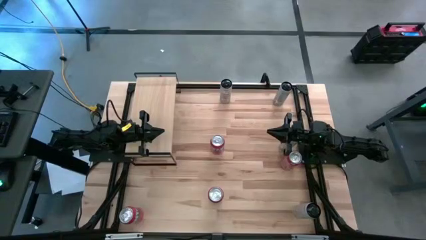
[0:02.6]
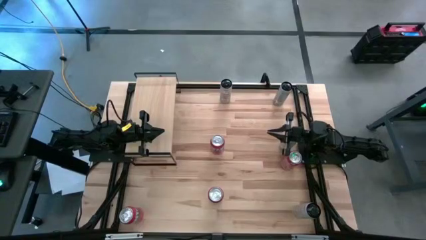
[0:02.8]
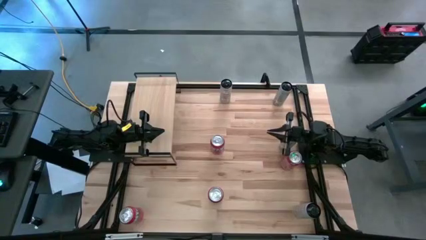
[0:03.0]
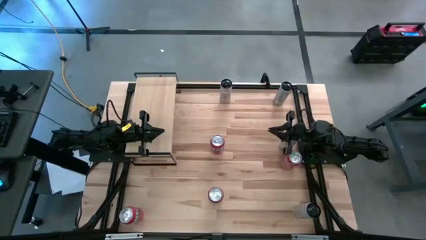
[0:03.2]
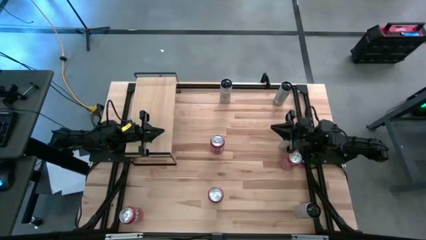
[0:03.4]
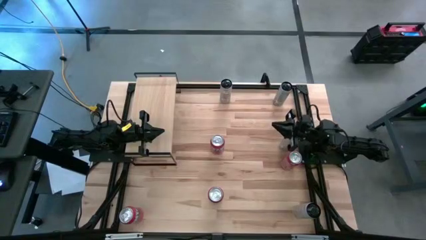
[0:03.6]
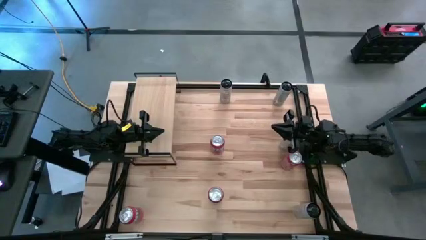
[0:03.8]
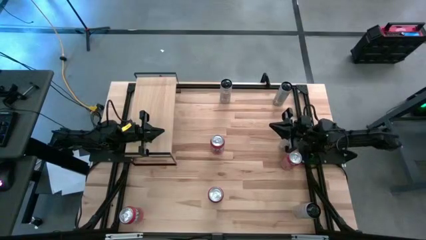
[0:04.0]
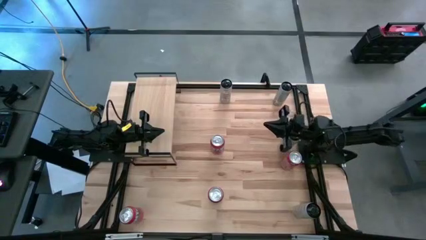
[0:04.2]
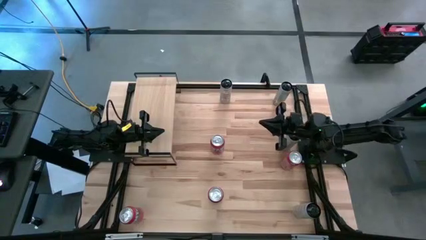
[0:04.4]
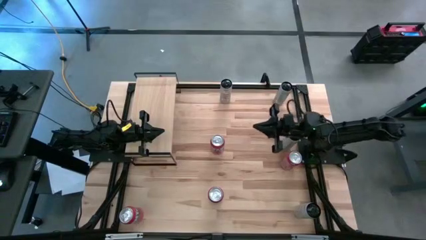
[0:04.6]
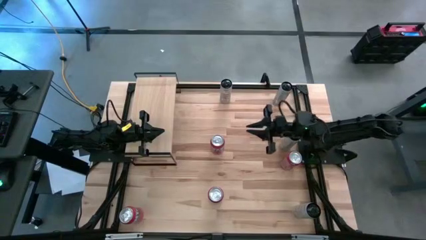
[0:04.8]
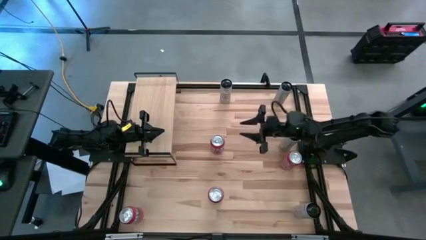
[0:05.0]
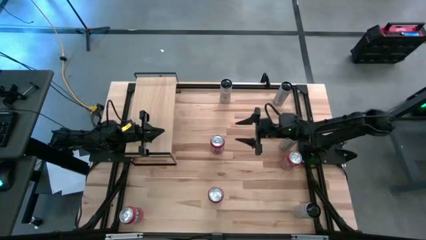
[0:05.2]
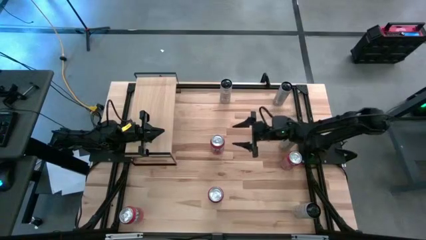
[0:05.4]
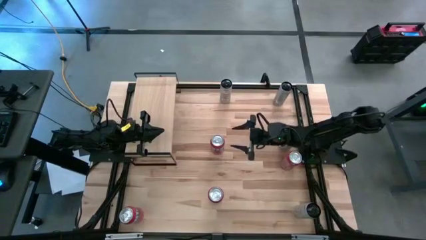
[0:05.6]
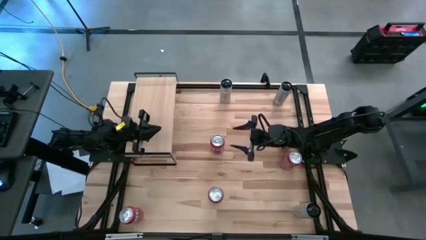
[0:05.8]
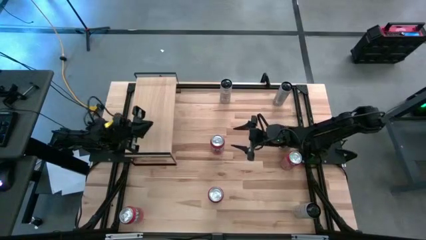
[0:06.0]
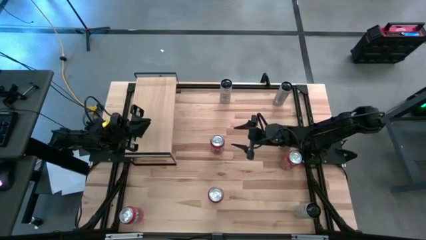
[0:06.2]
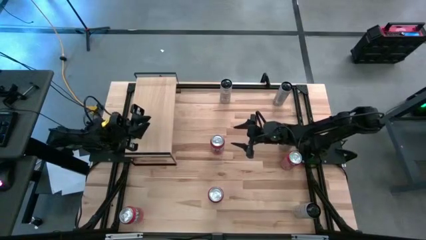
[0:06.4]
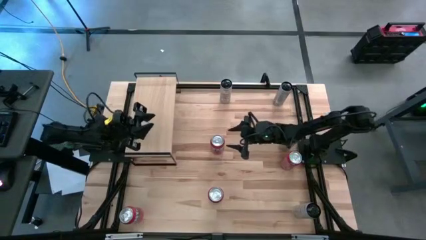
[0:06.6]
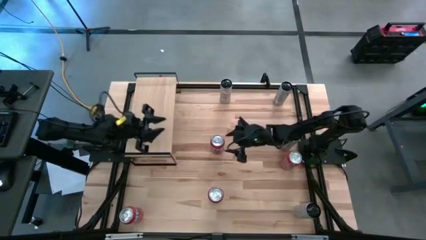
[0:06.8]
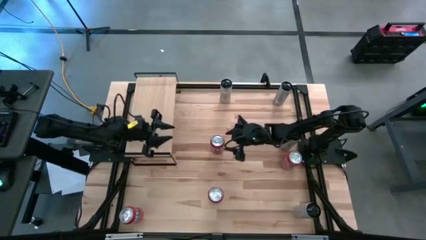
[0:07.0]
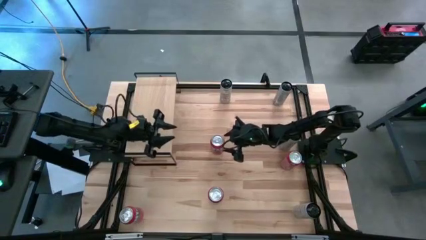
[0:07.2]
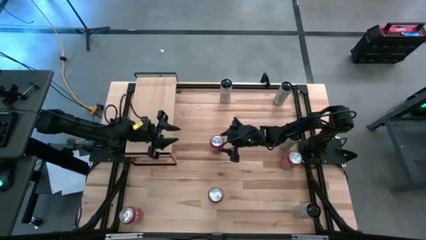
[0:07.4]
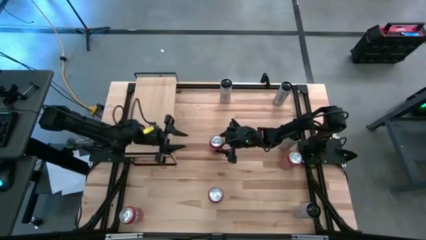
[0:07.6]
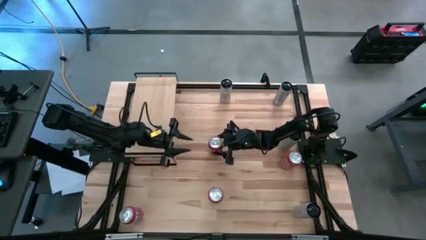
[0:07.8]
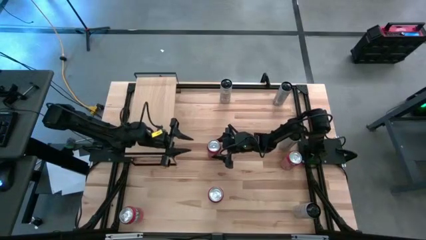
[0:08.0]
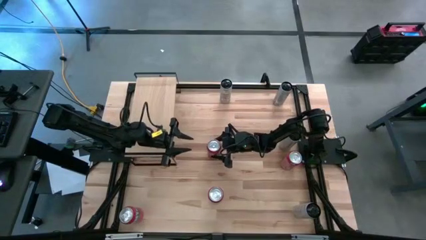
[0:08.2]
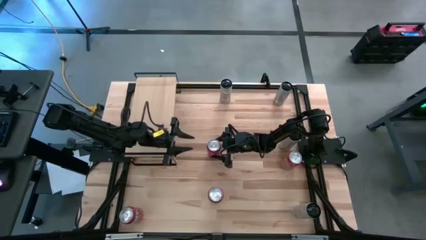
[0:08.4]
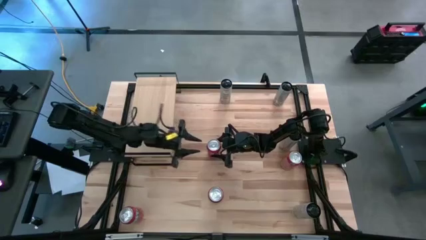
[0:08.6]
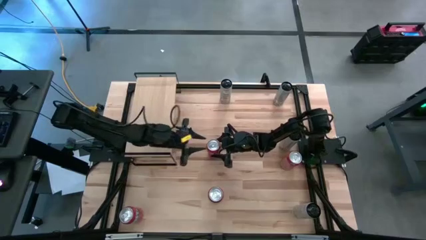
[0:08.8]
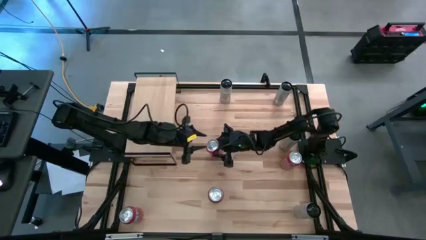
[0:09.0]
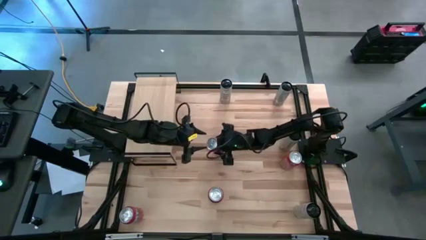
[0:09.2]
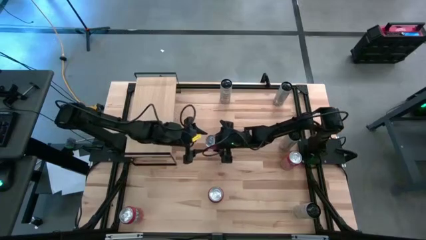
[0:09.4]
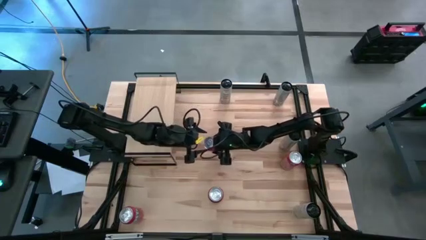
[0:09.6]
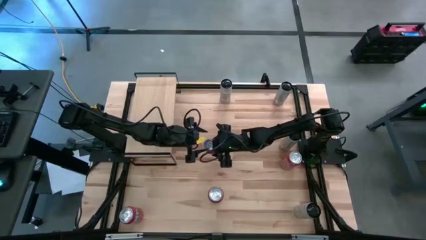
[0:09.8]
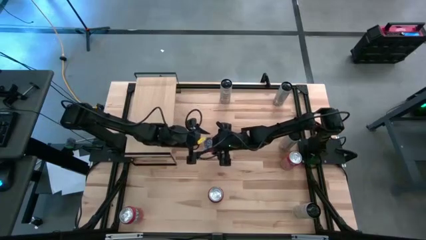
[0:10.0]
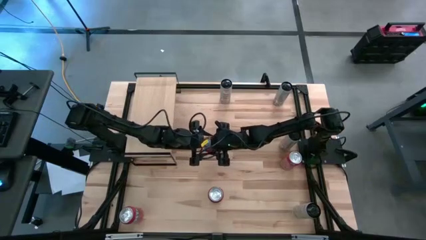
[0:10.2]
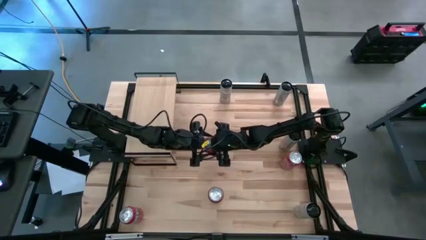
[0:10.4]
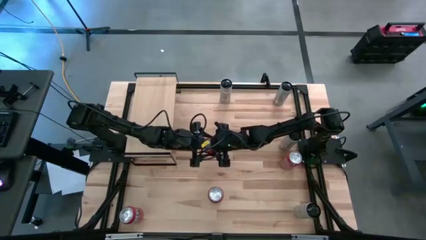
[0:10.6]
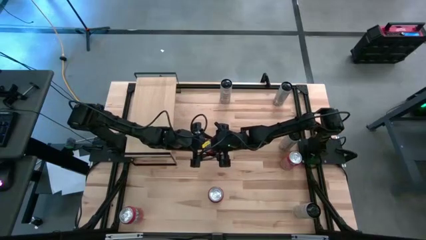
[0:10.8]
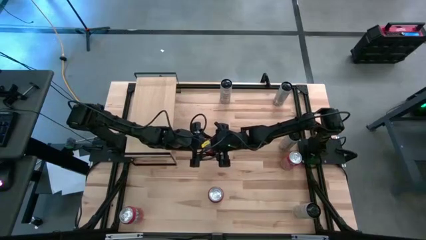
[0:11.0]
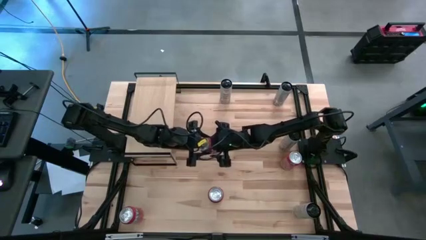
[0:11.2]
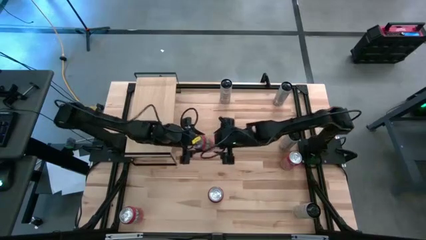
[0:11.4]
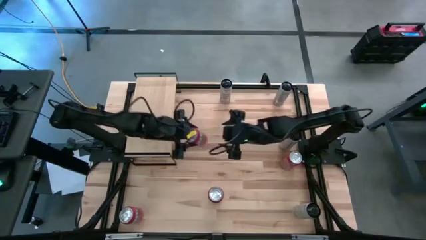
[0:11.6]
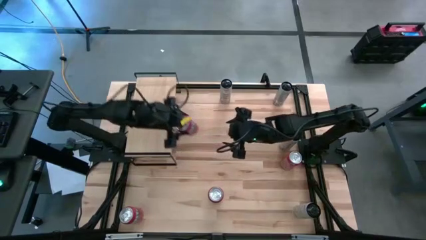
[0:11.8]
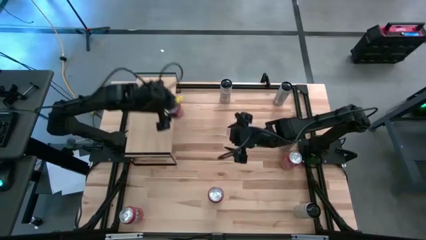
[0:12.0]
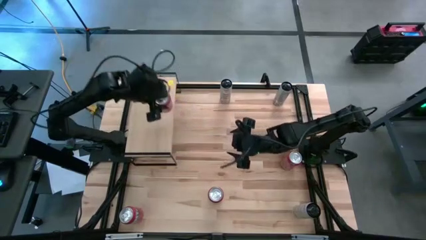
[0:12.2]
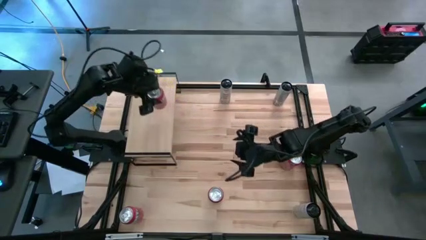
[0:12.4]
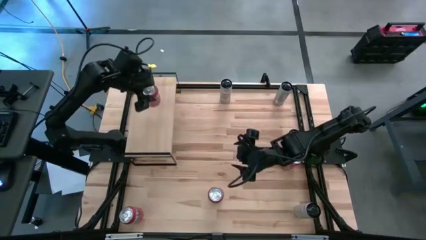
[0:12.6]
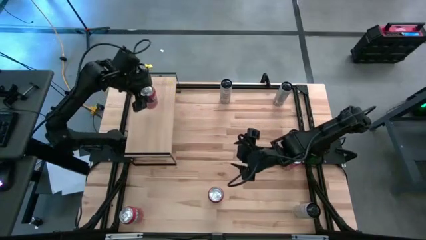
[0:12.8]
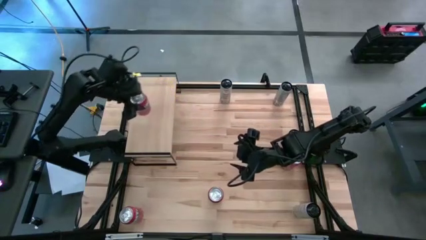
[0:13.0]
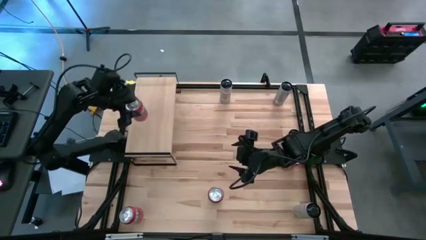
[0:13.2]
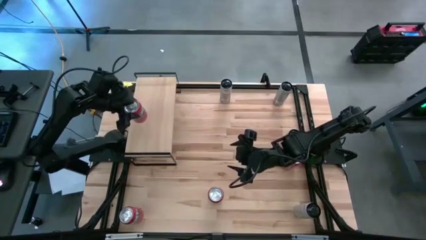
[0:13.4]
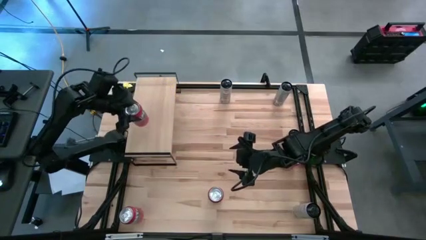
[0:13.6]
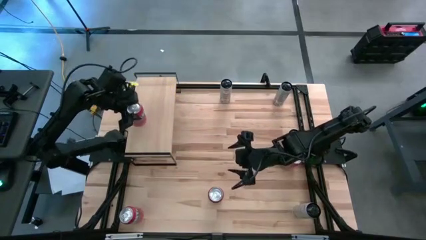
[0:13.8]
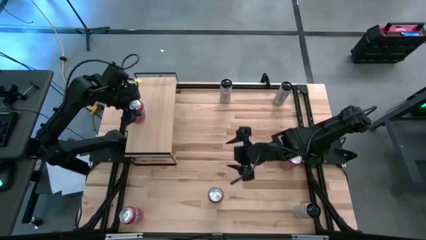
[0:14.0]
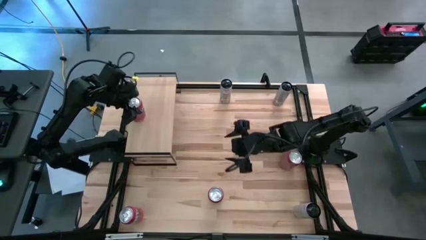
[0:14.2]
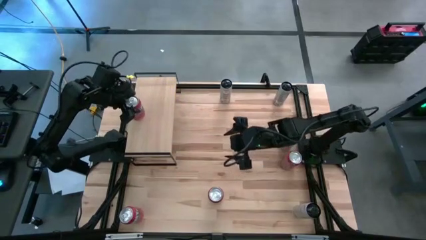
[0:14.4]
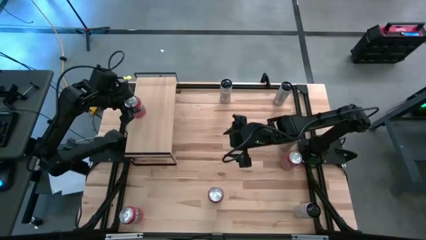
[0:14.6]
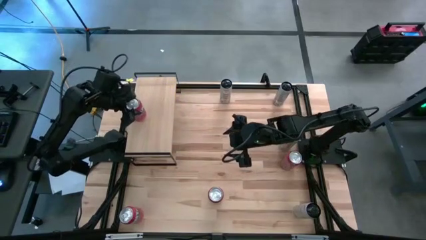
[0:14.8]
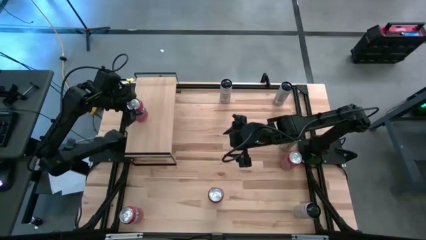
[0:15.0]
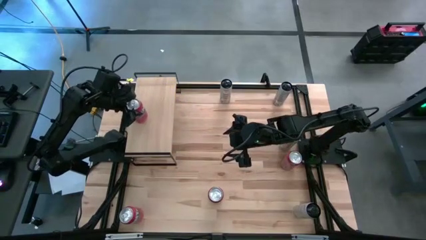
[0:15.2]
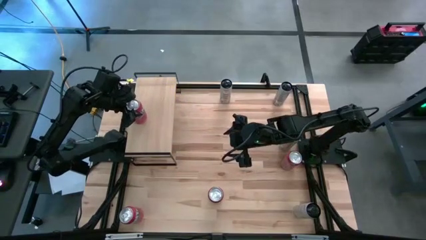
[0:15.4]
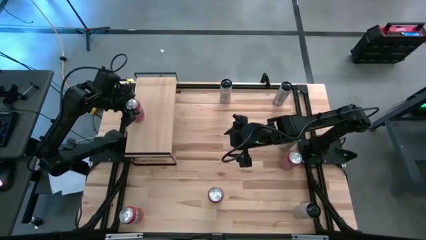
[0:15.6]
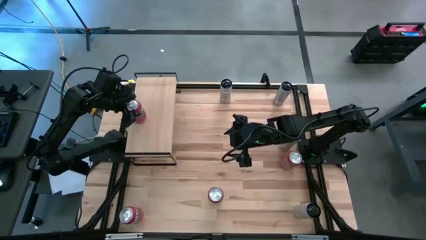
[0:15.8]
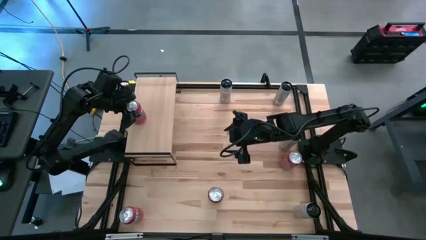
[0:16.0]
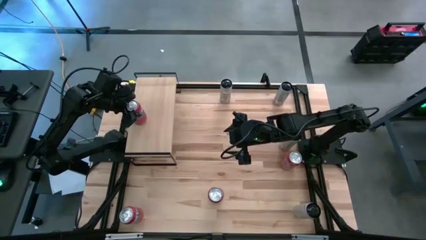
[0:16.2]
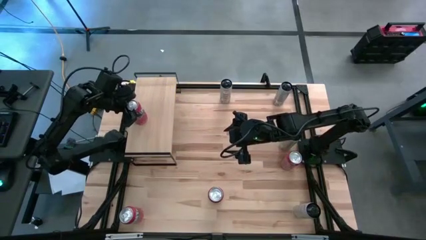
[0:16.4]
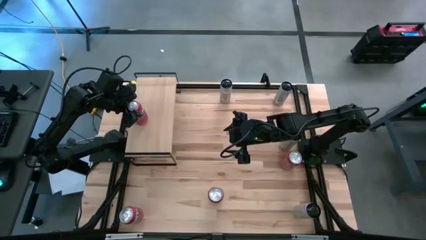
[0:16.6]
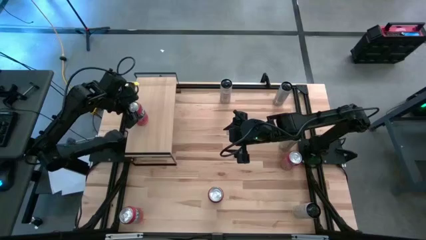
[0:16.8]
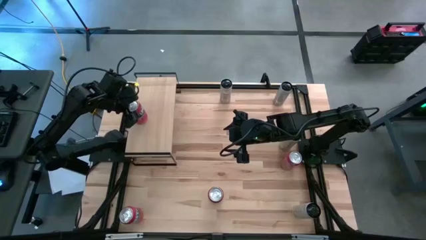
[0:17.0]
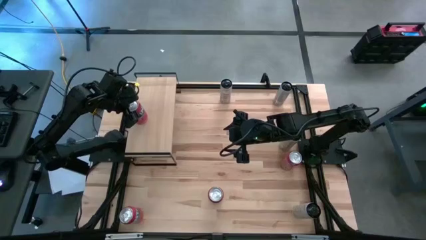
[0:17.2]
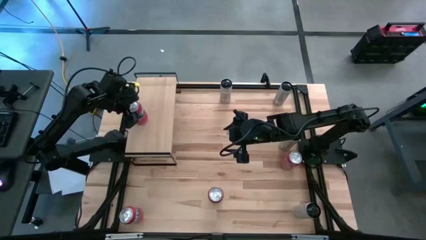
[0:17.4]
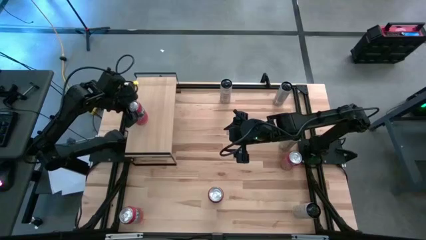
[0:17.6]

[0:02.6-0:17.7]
Task: Place canned beverage on shelf
Put the top red soda can on the shelf
